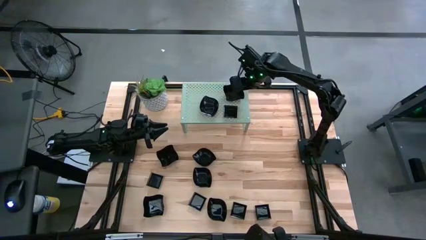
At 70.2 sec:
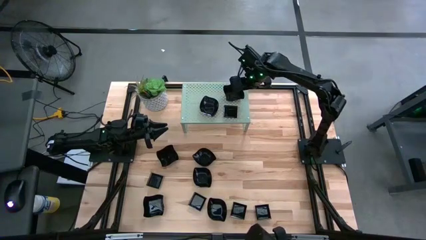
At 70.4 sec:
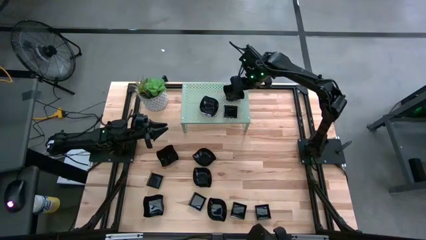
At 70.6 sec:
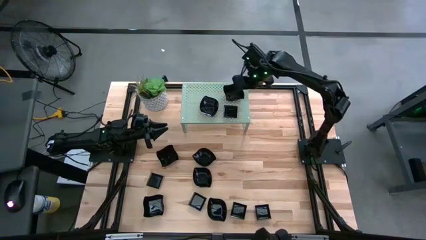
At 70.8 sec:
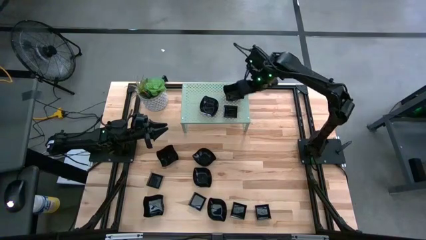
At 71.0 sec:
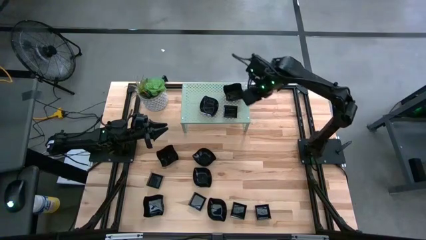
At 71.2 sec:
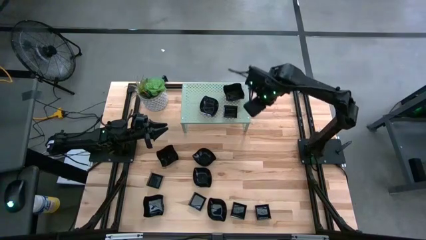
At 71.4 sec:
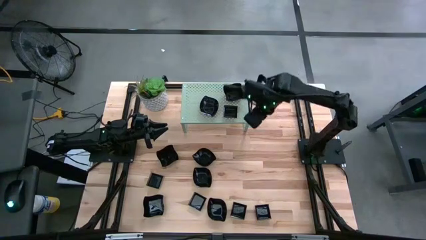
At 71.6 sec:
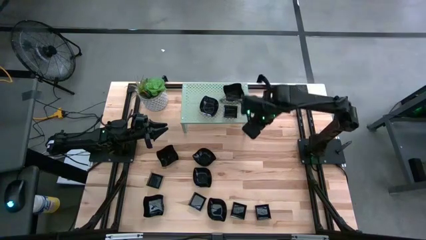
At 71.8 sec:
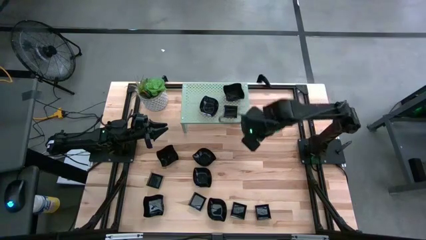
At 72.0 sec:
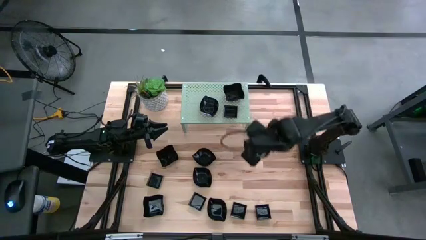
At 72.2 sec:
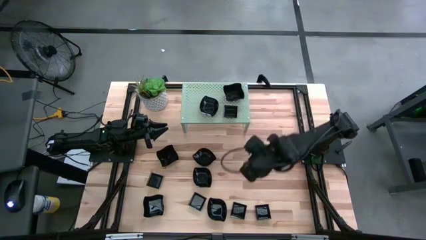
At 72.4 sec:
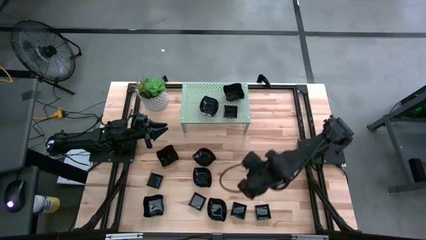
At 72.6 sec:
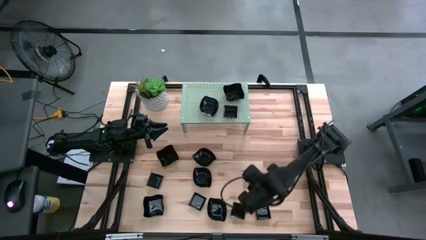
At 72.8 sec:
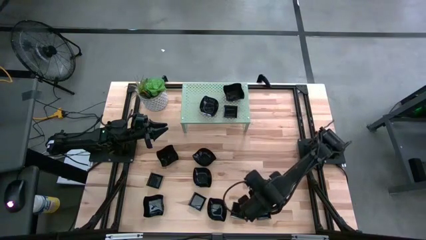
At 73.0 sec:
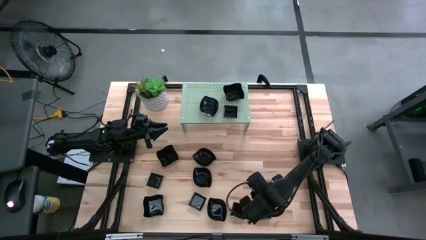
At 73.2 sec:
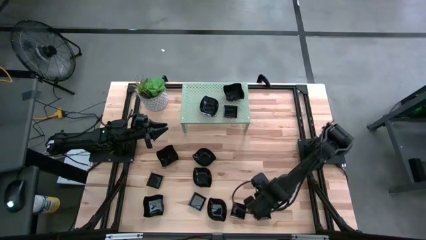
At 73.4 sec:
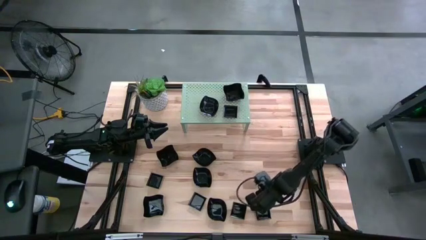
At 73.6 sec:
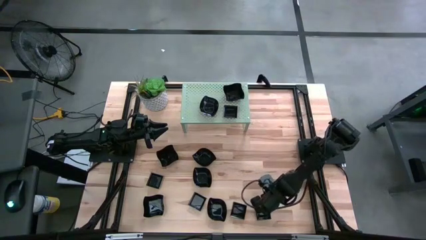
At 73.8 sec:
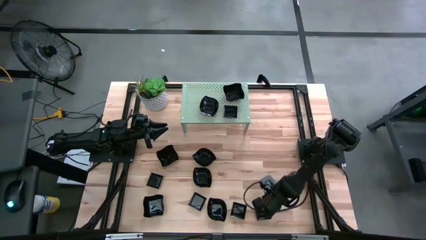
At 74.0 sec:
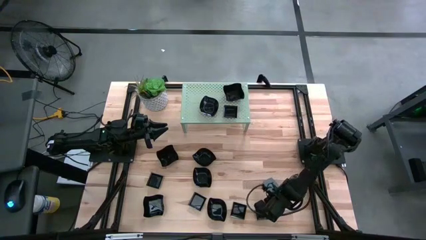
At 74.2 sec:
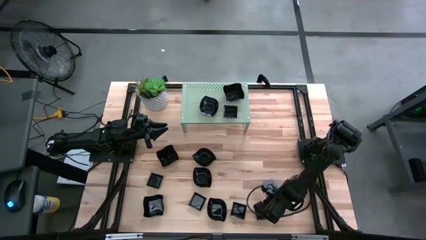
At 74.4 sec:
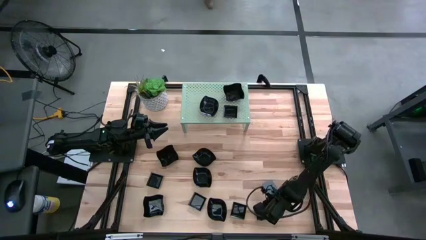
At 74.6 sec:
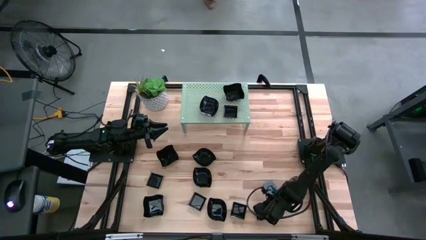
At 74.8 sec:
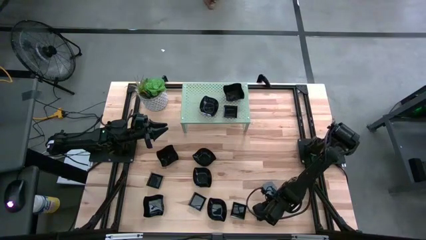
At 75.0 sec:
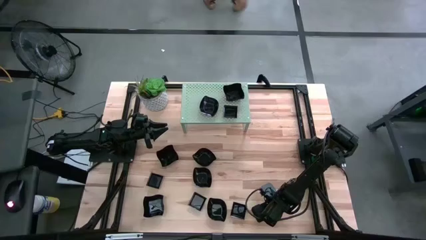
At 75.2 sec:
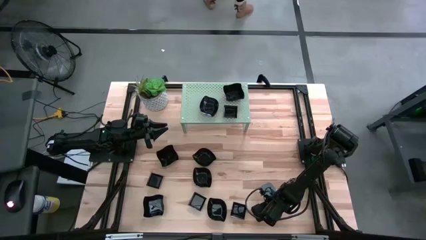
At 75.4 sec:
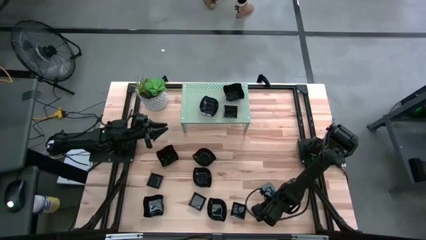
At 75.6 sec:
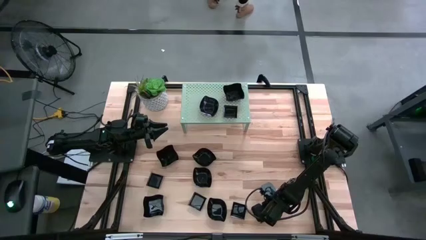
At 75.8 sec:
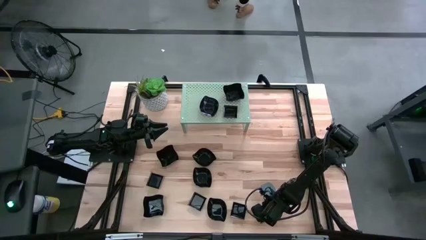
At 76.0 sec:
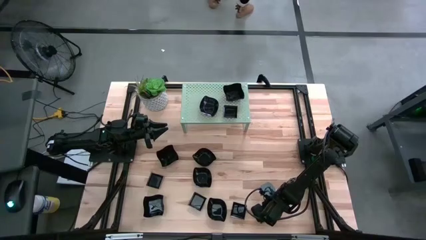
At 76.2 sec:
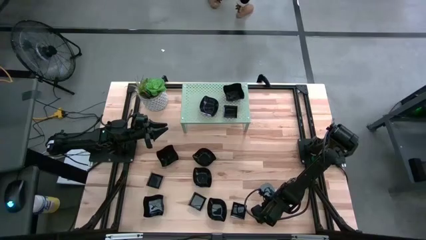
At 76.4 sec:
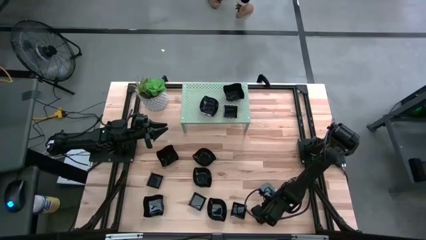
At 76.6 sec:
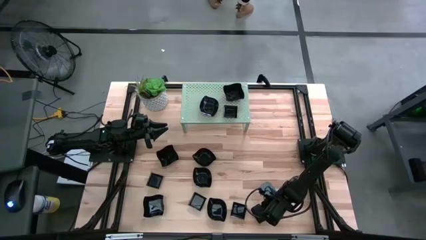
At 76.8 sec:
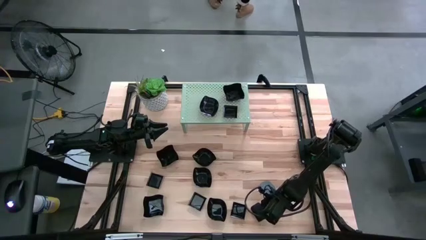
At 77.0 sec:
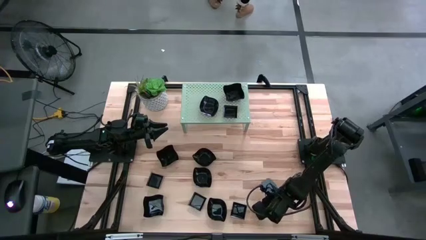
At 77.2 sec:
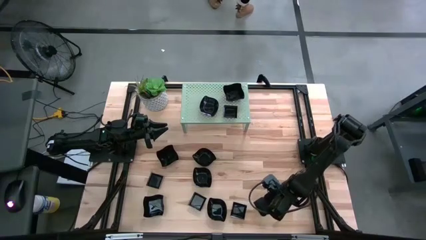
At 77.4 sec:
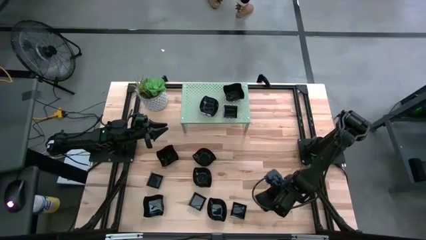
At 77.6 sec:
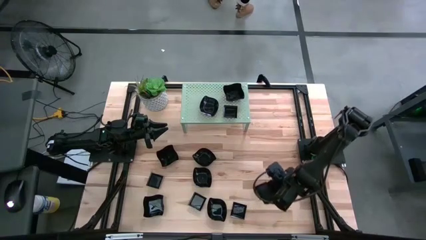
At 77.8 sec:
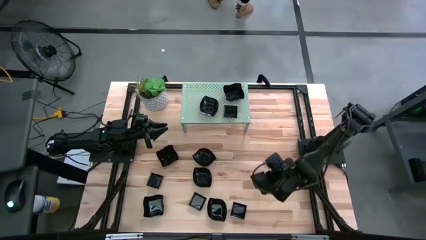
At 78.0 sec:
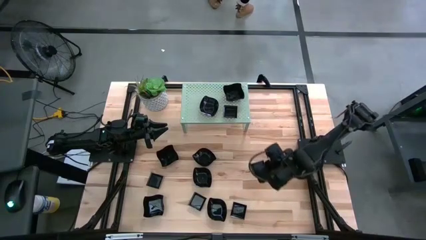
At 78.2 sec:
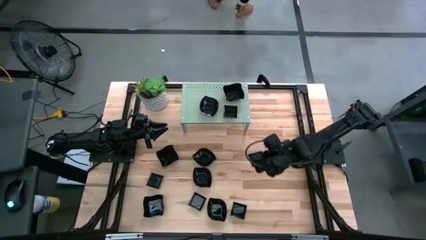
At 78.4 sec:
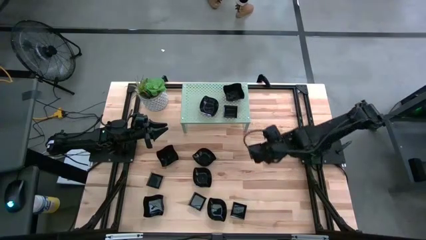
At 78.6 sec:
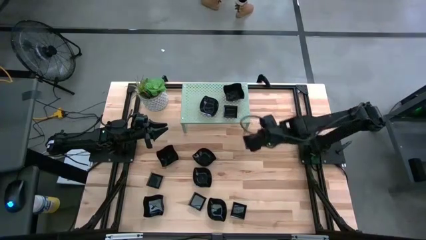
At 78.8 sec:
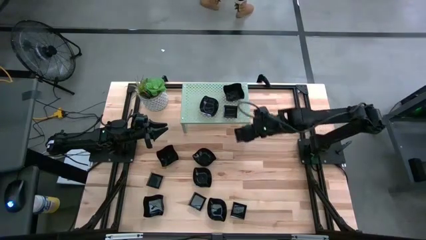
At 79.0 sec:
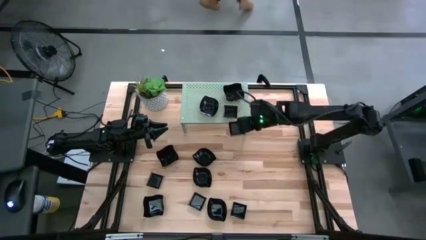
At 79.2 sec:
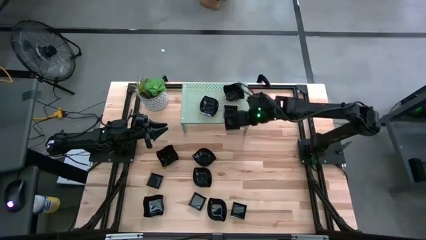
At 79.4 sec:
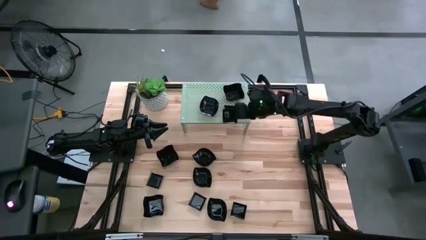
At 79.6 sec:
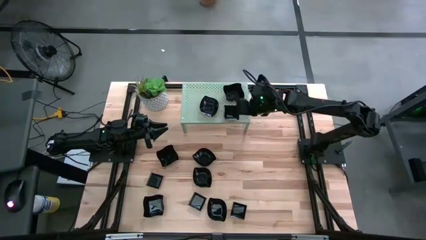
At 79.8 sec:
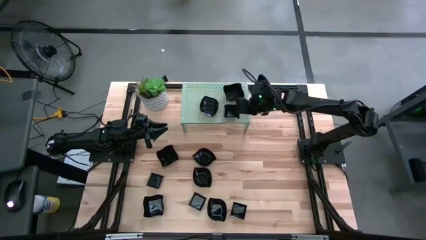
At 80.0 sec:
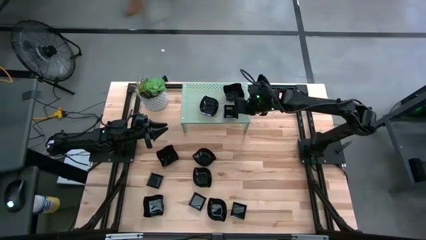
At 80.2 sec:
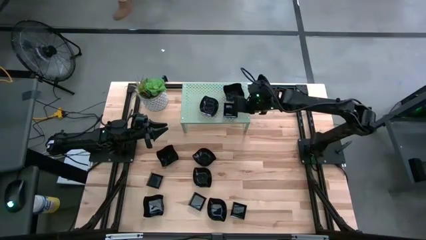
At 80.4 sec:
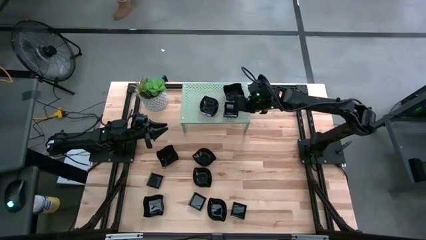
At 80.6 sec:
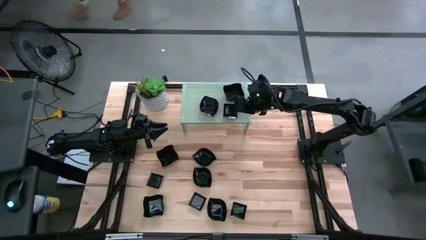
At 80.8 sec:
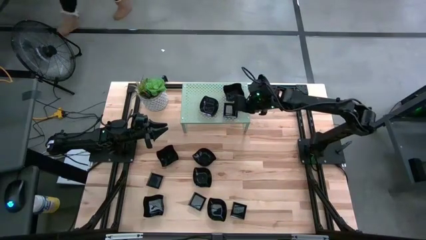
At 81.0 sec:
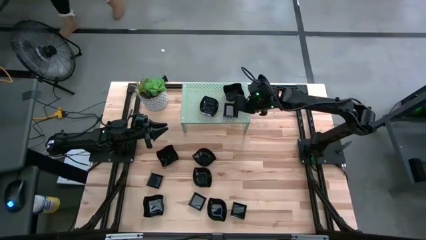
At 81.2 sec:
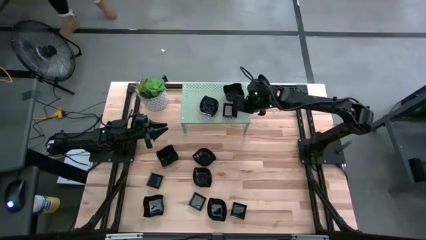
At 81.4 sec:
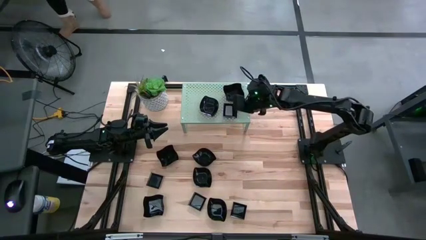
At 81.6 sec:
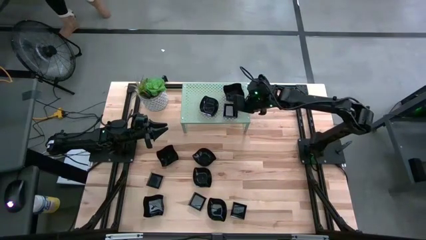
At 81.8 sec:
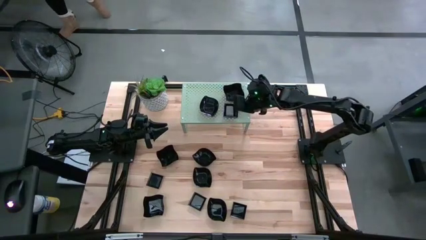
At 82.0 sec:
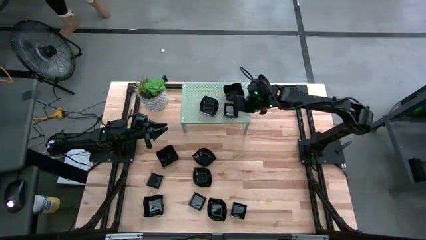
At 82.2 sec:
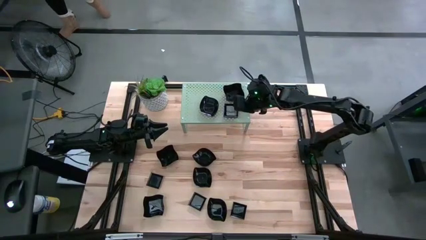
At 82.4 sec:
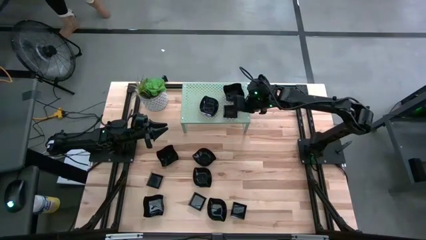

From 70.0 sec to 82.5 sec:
Task: Pick & Place Mini shaped plates
Stack the square plate on top of the square plate on the shelf

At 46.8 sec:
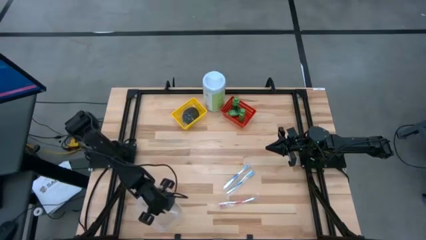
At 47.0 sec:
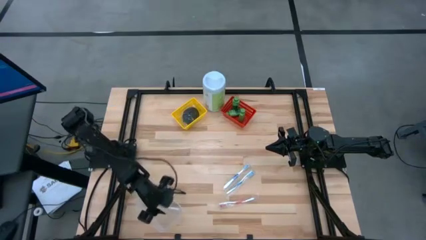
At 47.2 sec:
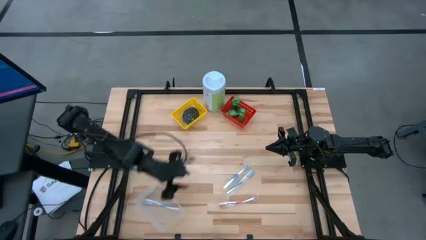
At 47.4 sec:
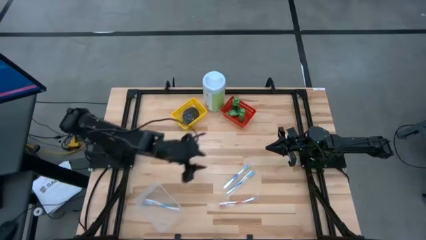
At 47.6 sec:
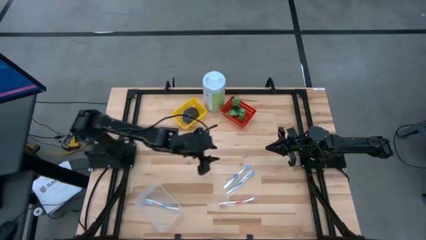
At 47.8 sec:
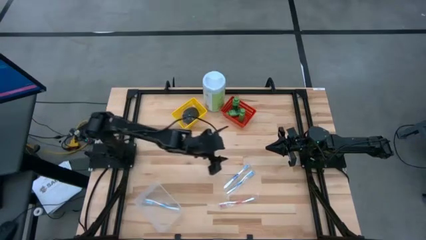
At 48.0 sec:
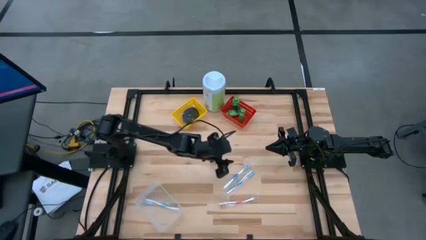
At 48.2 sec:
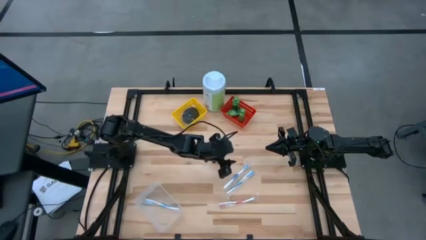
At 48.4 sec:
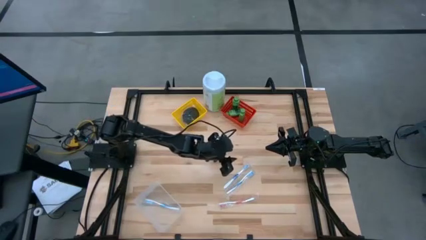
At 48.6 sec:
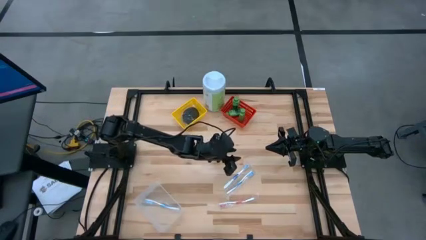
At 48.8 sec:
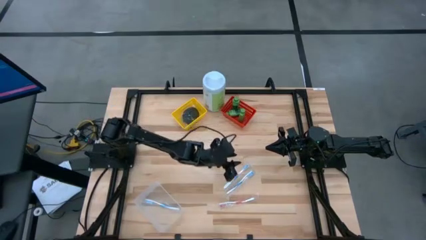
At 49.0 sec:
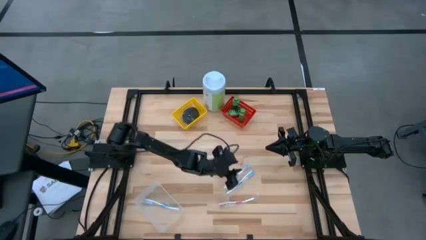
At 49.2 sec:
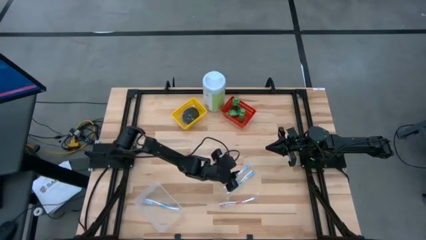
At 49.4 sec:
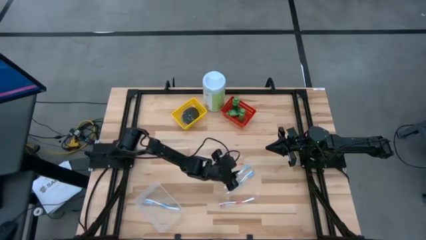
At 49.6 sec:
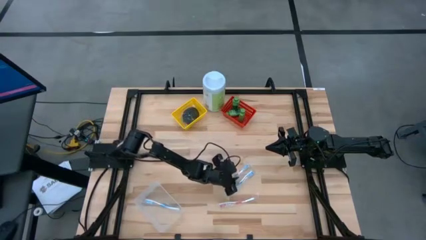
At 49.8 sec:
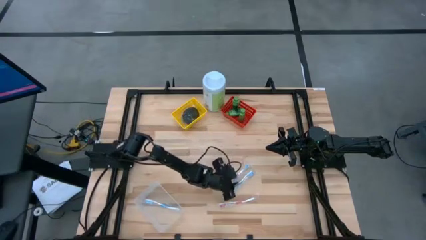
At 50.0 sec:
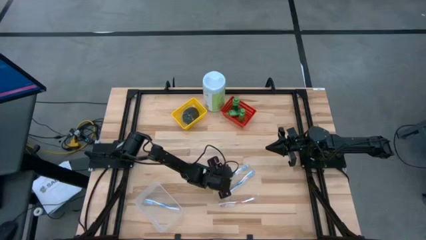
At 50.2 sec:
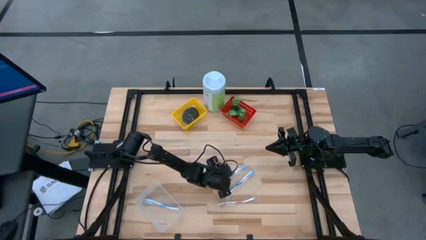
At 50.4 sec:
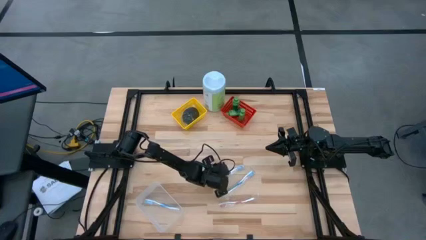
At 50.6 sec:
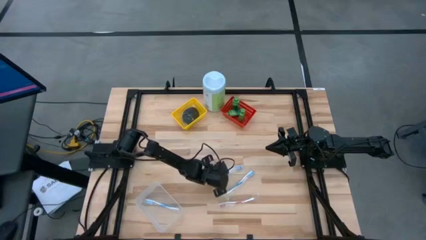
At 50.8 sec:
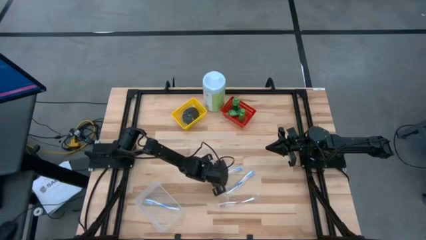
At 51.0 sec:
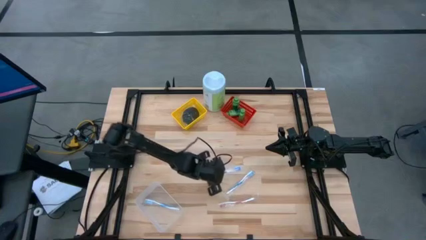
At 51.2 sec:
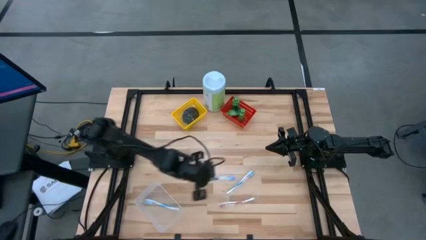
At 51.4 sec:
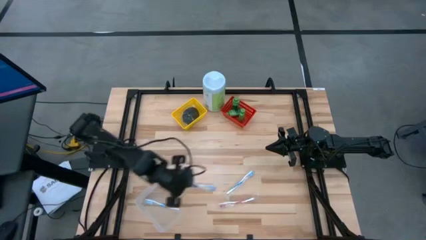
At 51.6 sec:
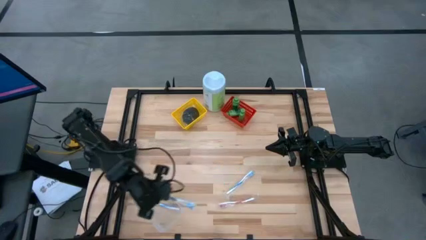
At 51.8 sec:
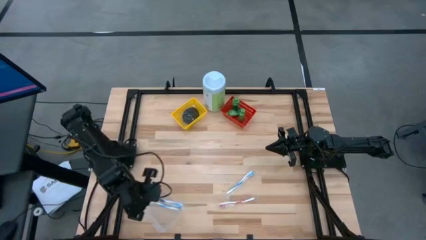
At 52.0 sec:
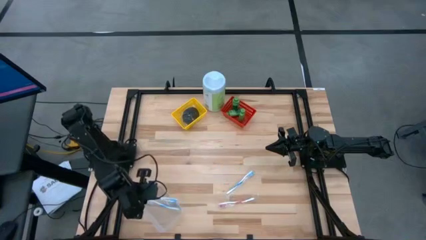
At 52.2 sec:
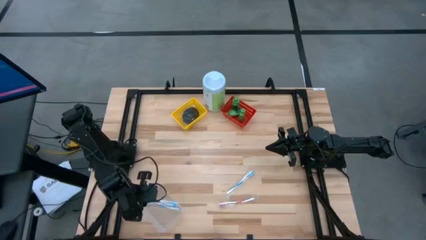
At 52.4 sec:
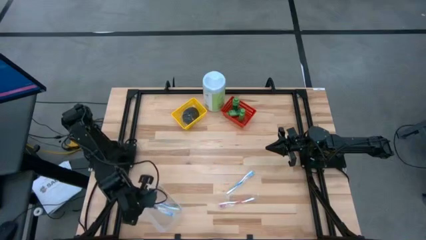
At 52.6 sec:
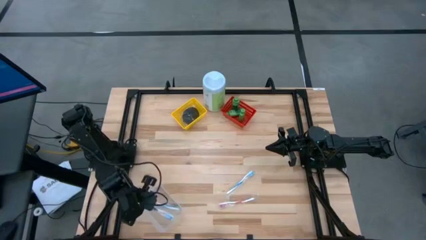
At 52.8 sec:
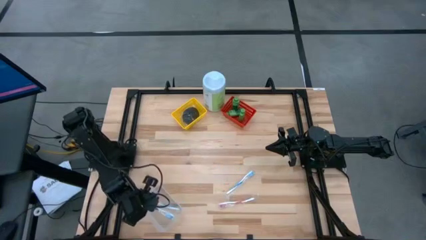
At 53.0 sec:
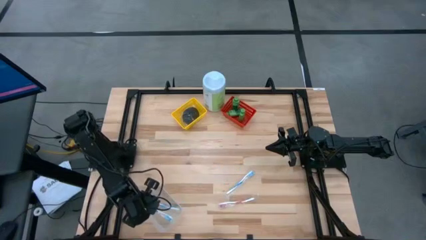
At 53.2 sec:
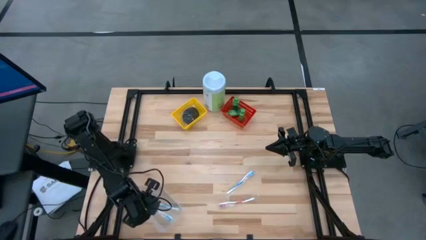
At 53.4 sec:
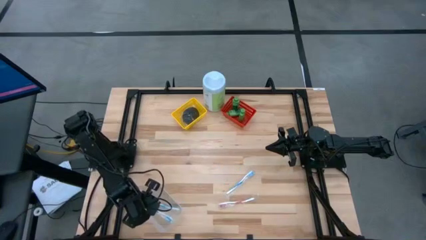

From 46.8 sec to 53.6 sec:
Task: Pick & Place Travel size toiletries
Put the dark blue toothbrush into the transparent bin
